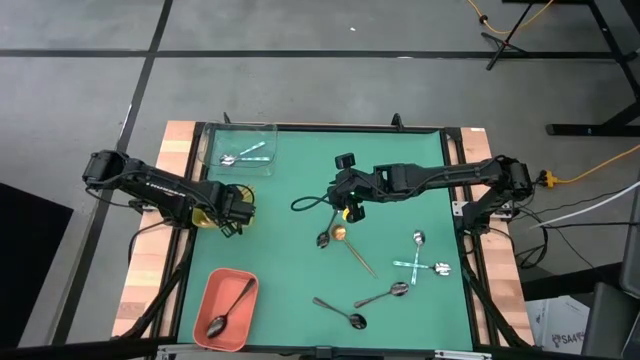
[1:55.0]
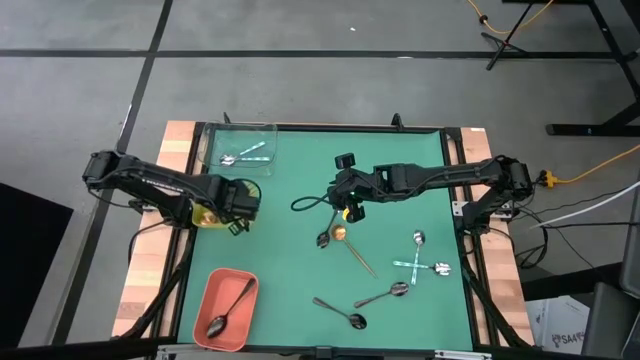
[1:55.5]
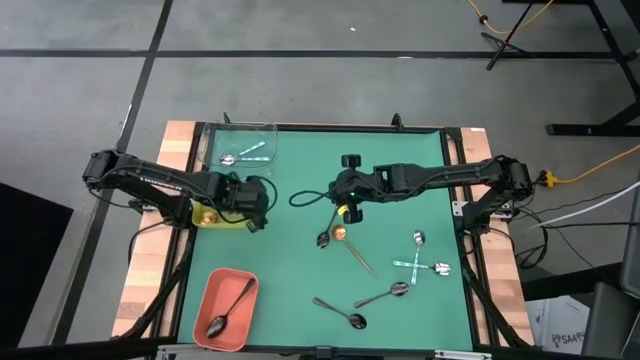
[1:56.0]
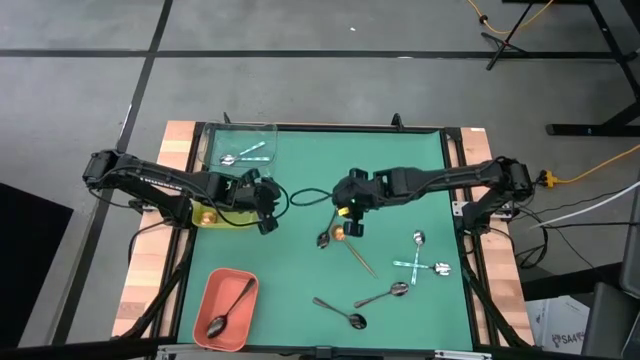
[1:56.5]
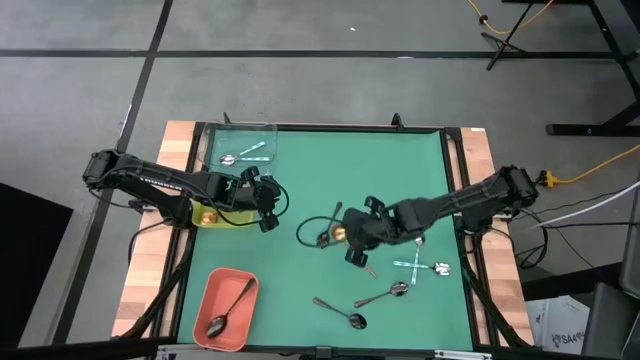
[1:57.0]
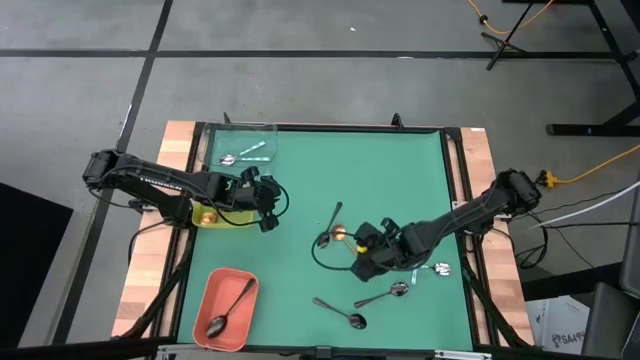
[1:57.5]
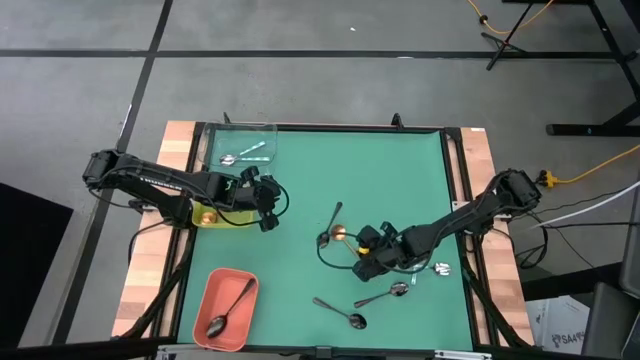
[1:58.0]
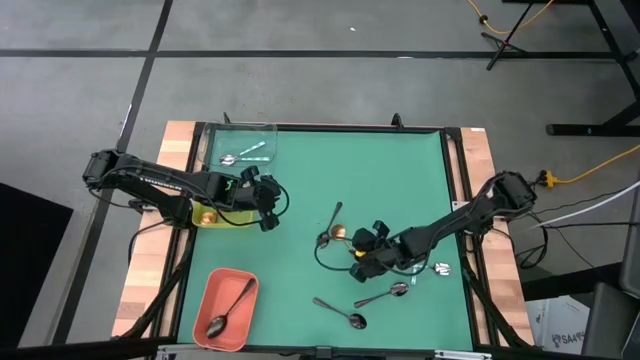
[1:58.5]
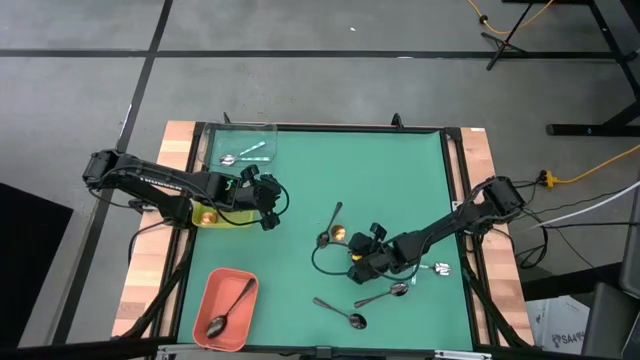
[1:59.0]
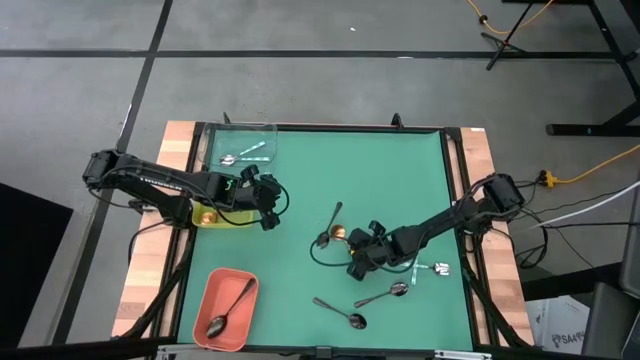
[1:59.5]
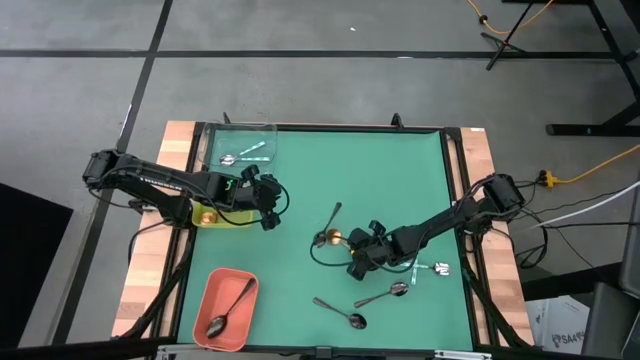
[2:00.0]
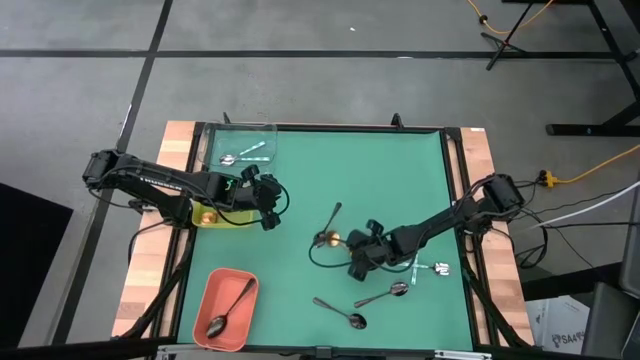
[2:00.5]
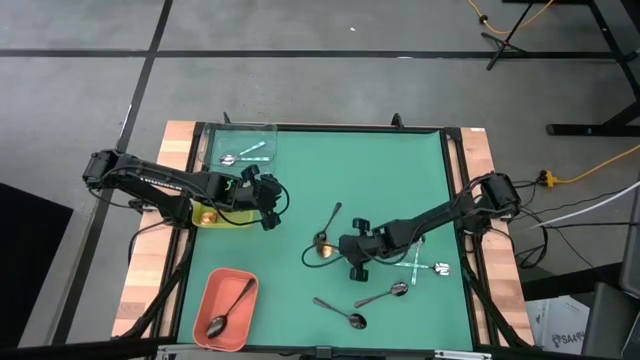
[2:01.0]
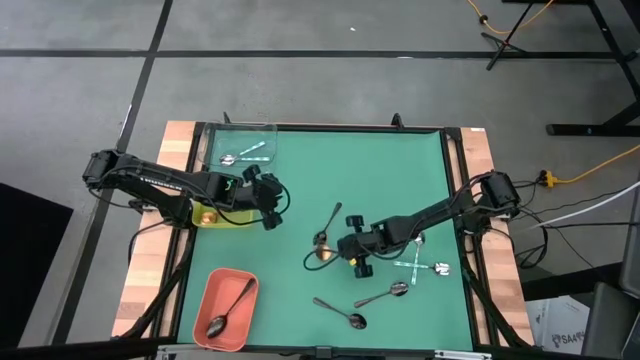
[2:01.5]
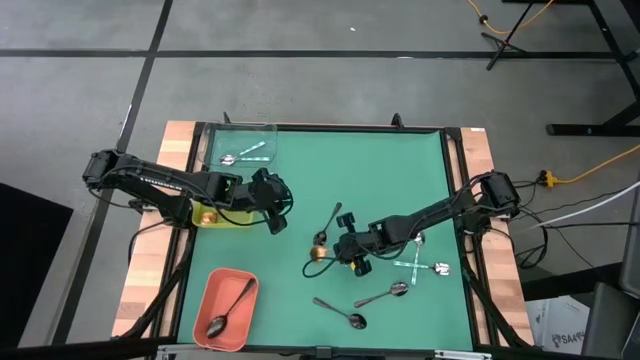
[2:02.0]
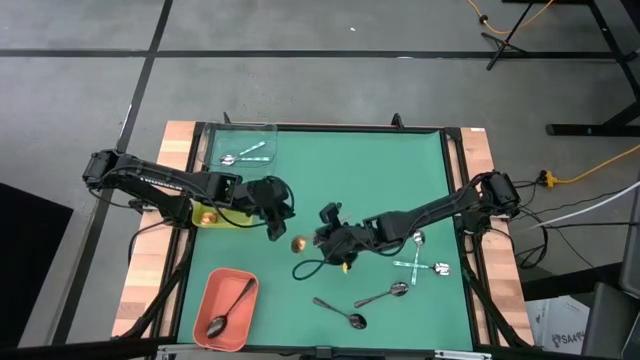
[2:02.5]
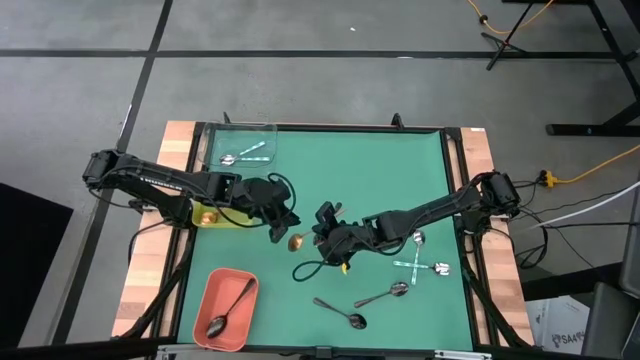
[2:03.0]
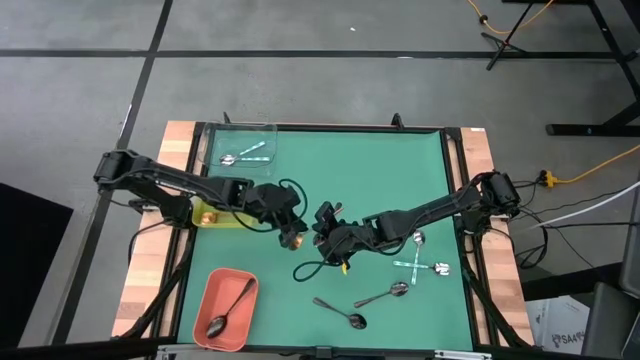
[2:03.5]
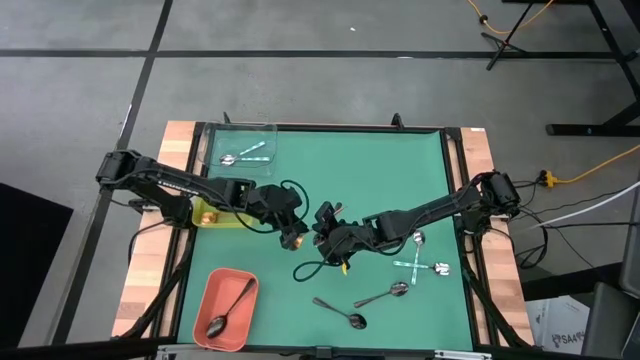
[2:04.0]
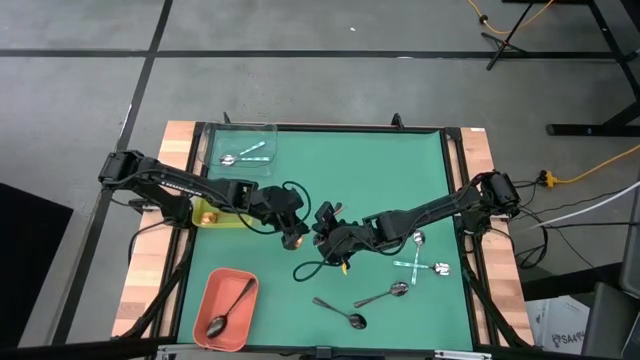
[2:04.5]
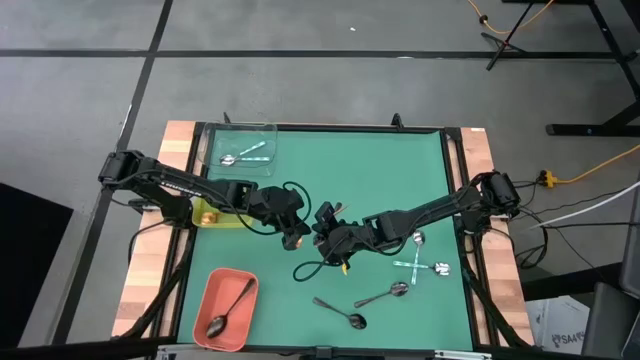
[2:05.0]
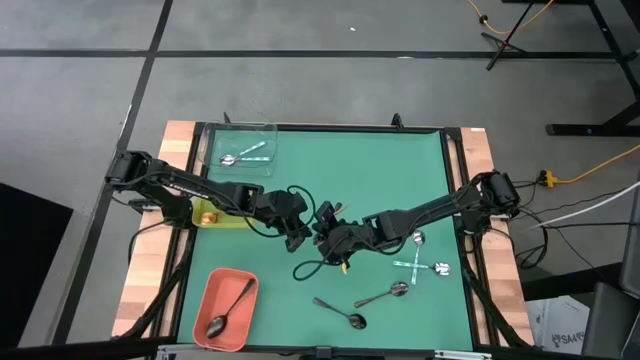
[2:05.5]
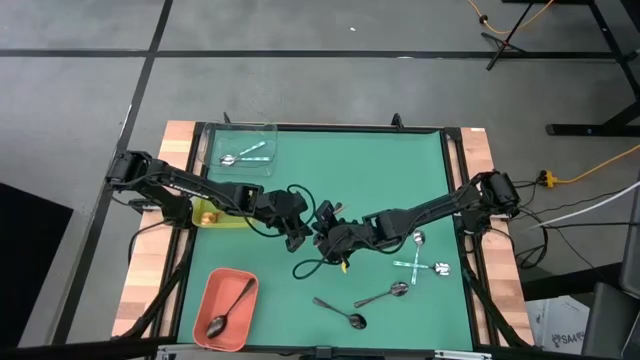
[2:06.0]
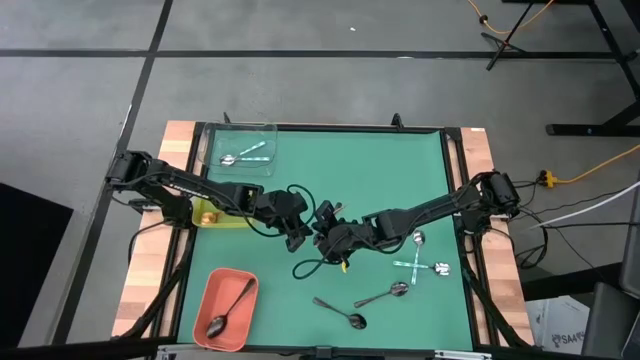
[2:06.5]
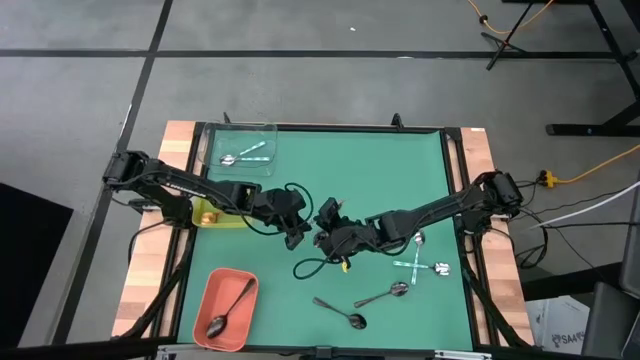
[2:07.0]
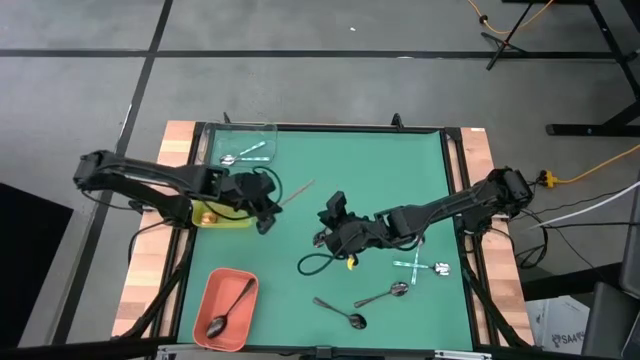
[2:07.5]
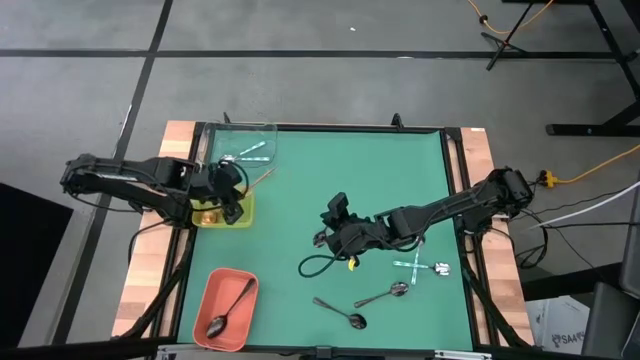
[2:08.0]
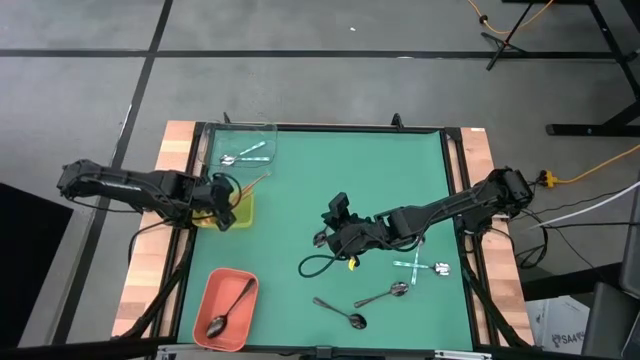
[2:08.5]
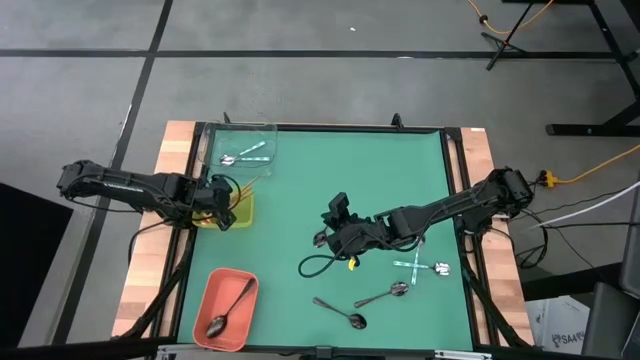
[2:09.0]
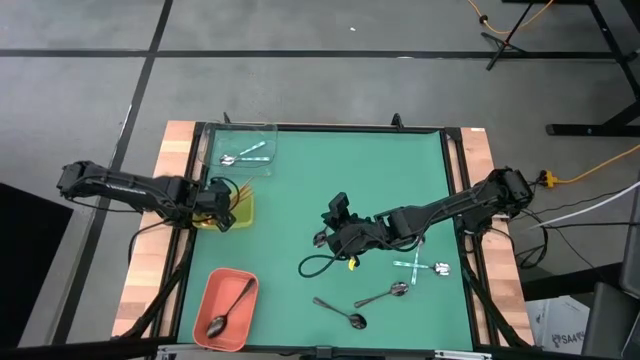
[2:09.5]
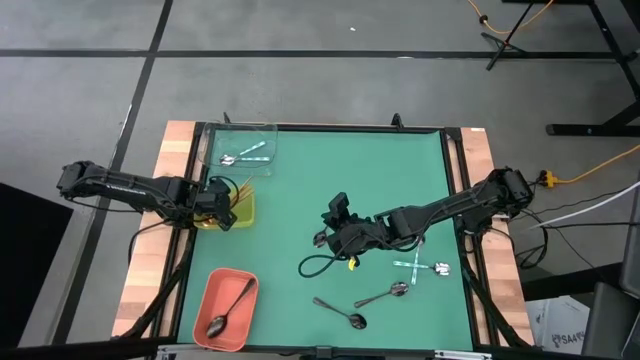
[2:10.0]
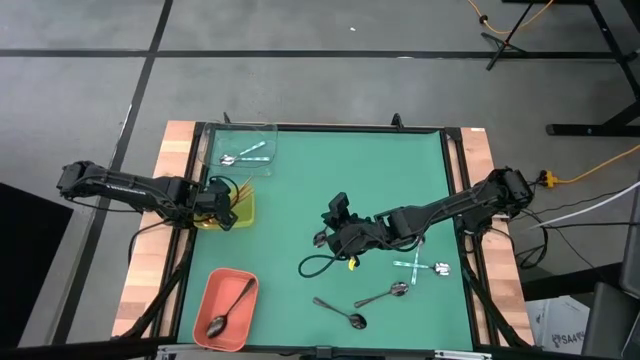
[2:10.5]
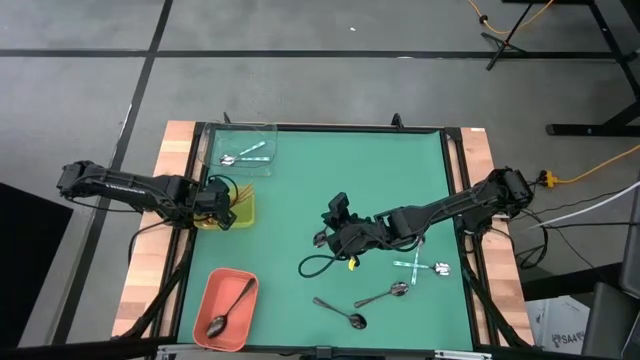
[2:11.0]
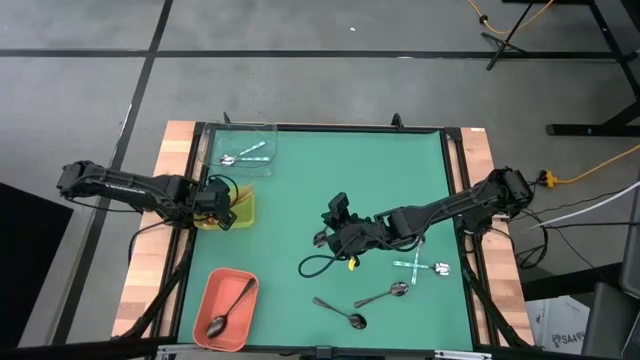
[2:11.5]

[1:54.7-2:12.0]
Task: Sort silverware by color (type)
Put the gold spoon into the yellow bin

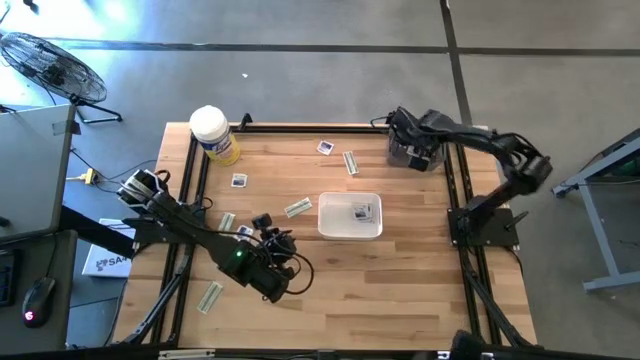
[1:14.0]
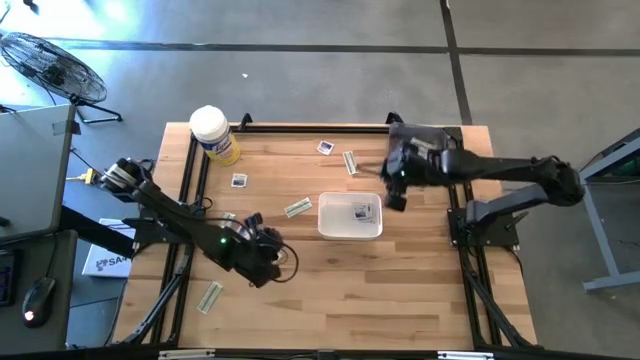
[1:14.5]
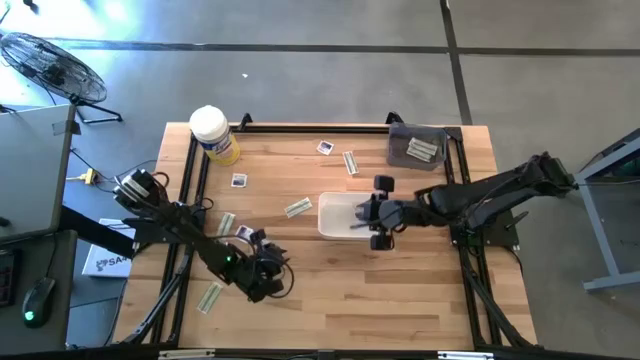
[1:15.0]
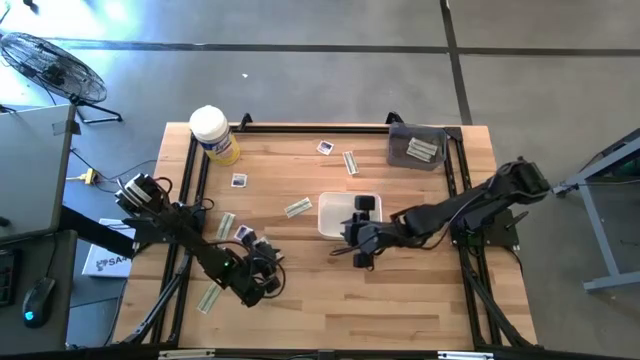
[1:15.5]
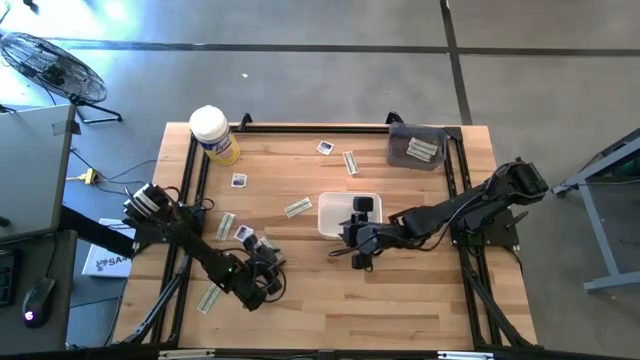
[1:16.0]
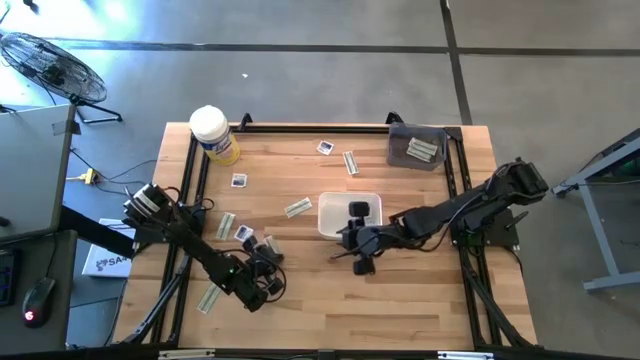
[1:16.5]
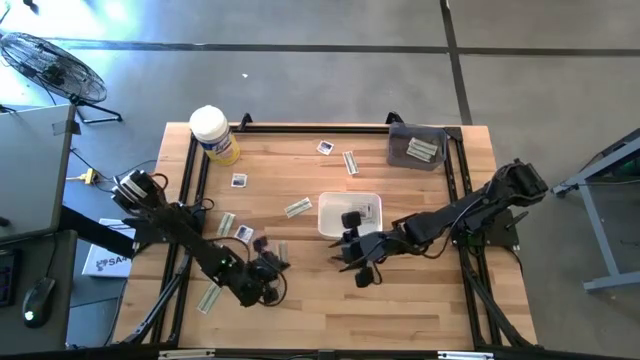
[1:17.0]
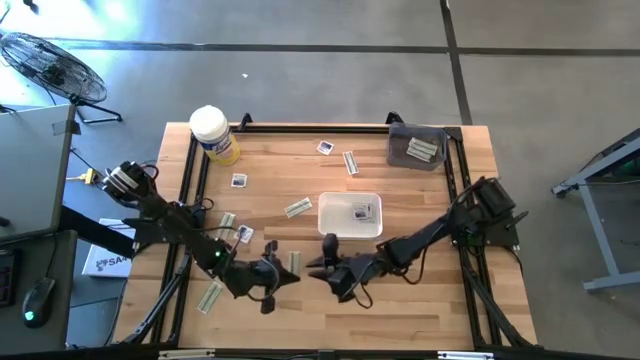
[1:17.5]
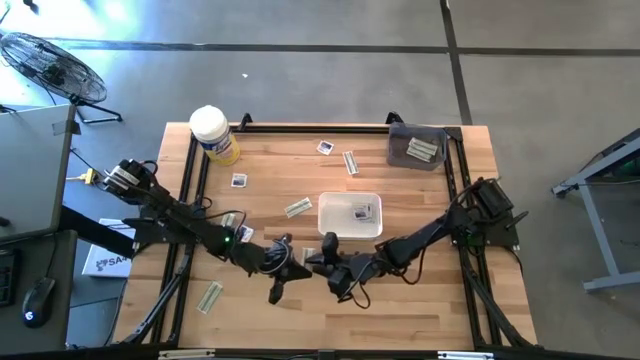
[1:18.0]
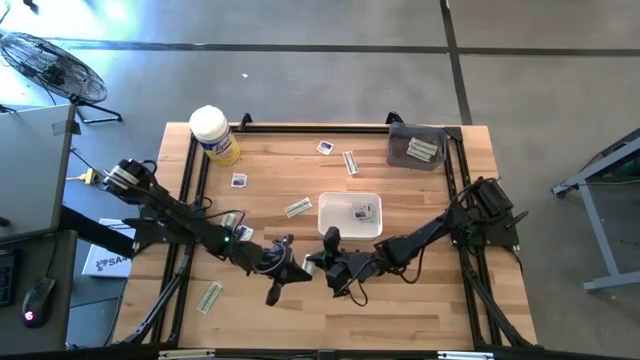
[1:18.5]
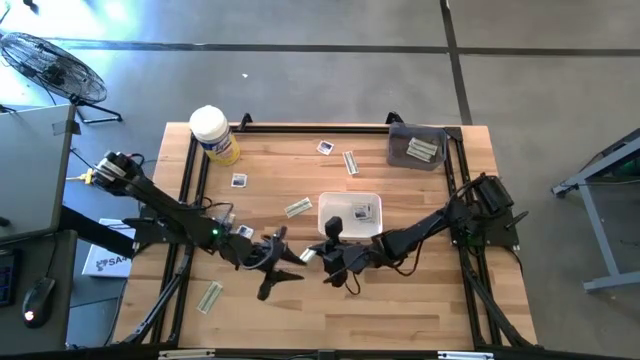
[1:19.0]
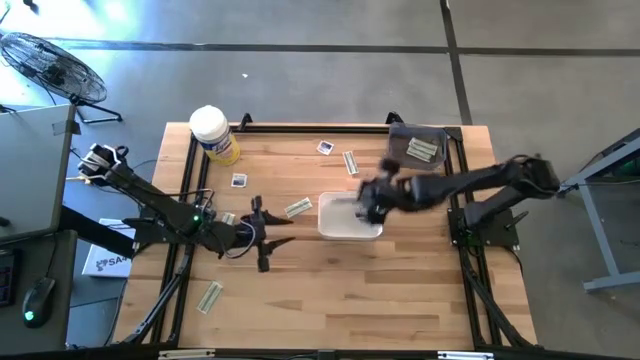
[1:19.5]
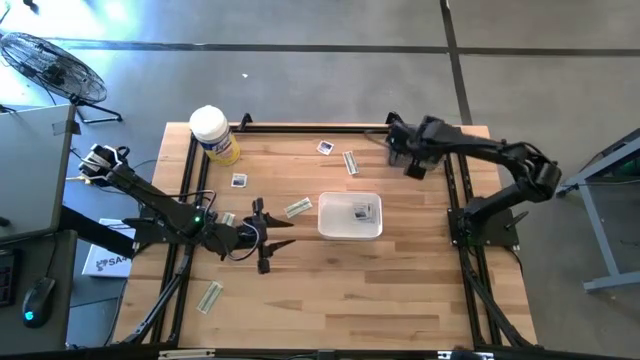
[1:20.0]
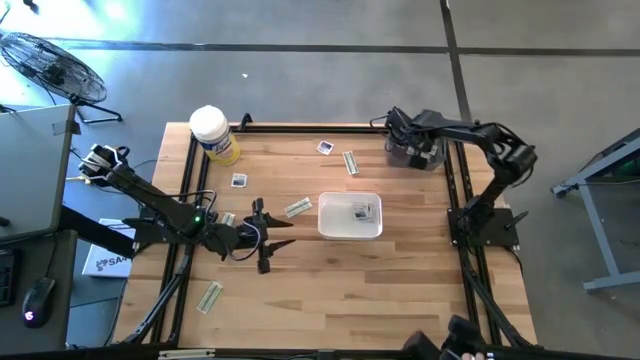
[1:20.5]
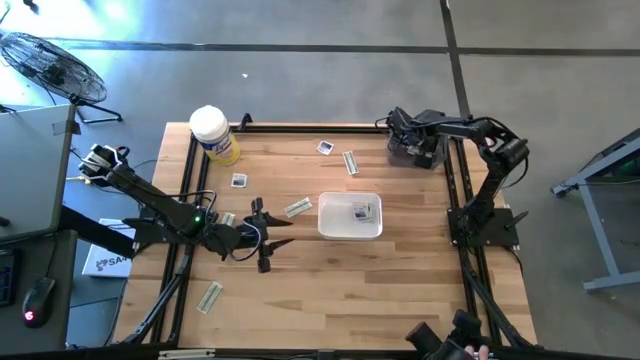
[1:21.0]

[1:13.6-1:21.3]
Task: Pick & Place First Aid Supplies
Put the green bandage into the black bin
